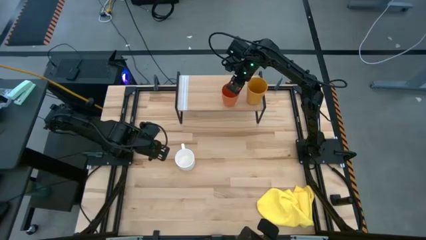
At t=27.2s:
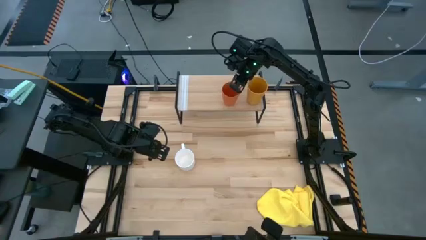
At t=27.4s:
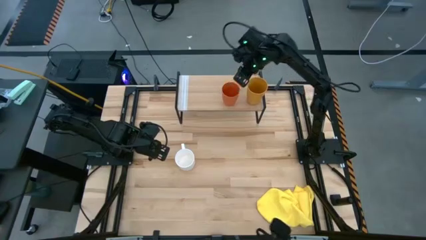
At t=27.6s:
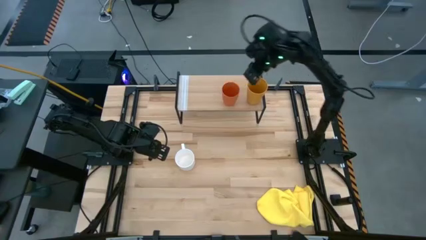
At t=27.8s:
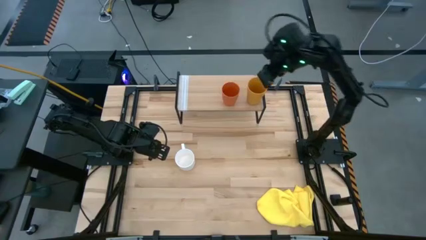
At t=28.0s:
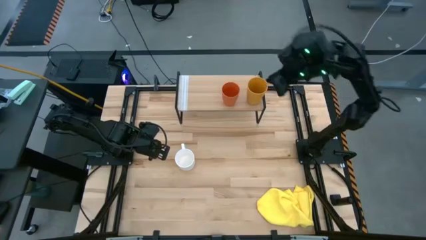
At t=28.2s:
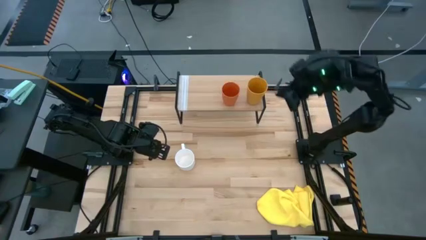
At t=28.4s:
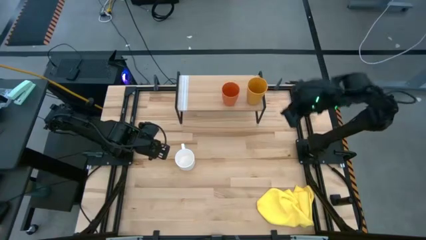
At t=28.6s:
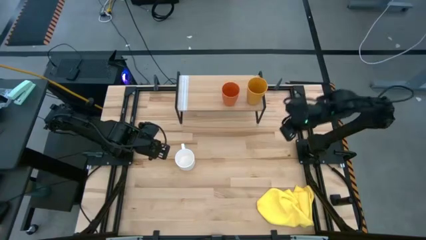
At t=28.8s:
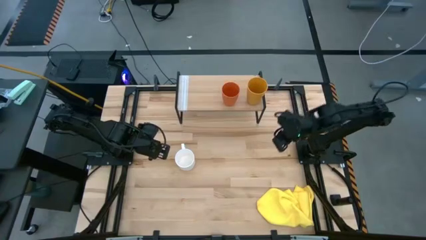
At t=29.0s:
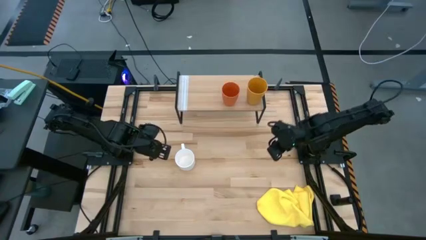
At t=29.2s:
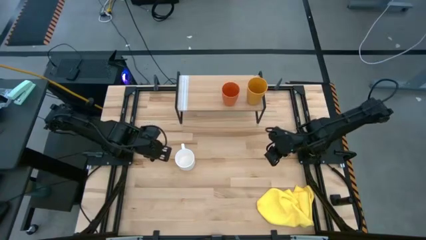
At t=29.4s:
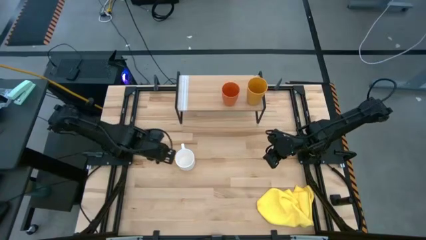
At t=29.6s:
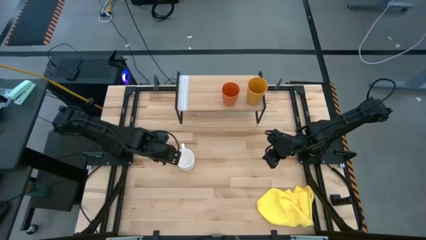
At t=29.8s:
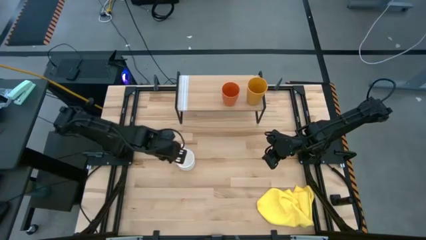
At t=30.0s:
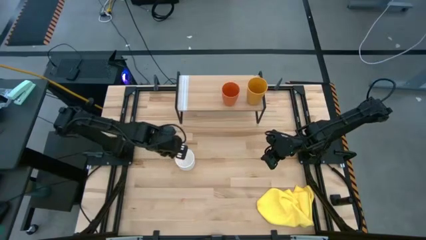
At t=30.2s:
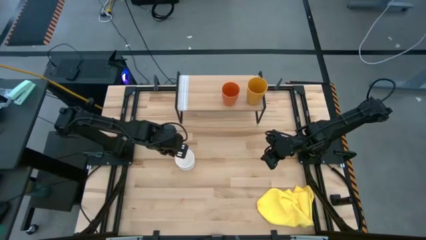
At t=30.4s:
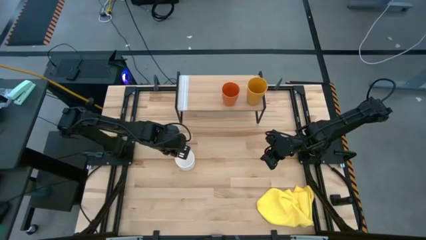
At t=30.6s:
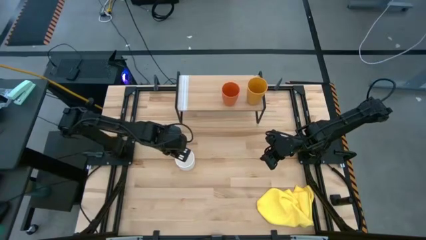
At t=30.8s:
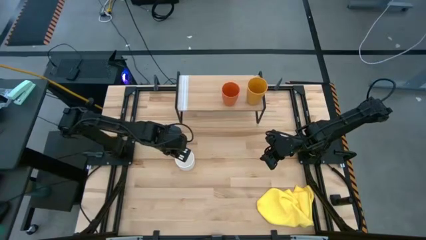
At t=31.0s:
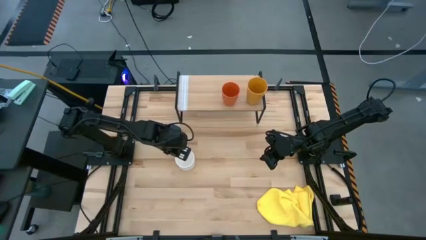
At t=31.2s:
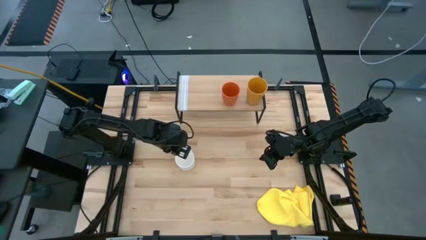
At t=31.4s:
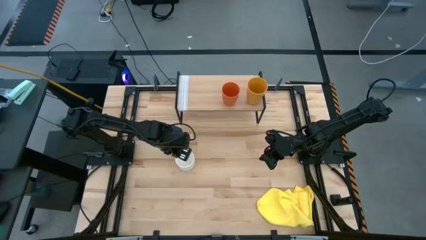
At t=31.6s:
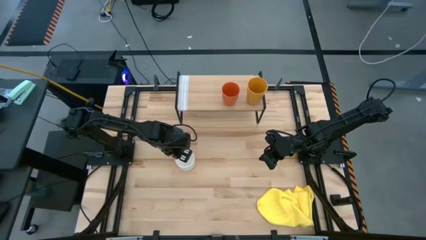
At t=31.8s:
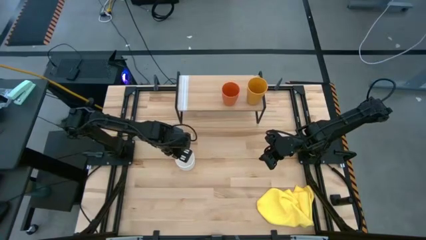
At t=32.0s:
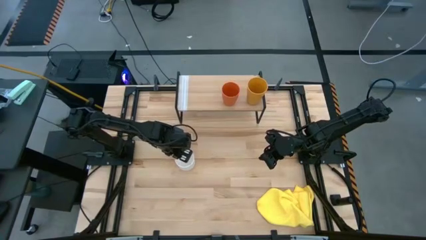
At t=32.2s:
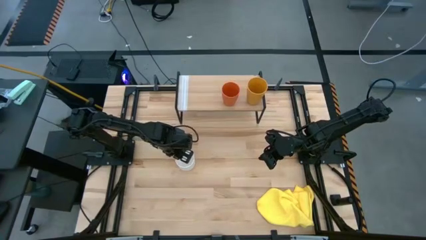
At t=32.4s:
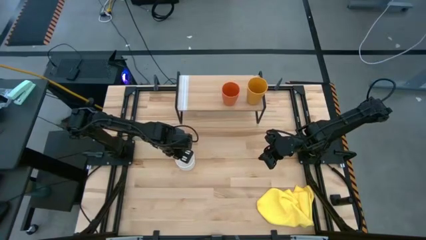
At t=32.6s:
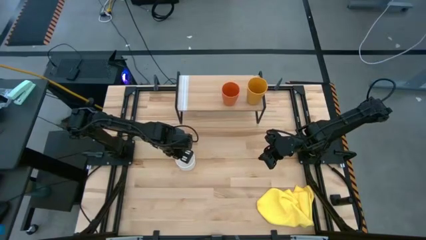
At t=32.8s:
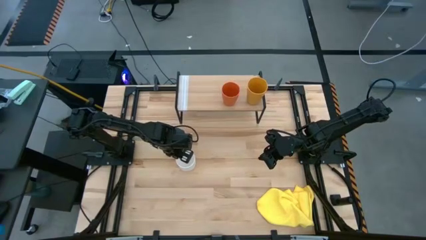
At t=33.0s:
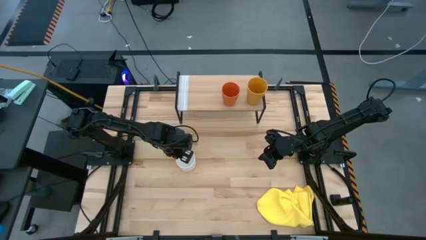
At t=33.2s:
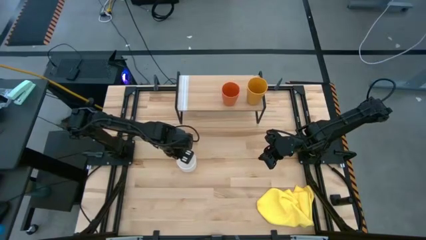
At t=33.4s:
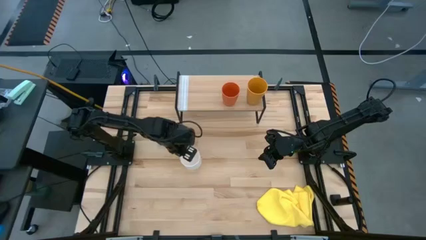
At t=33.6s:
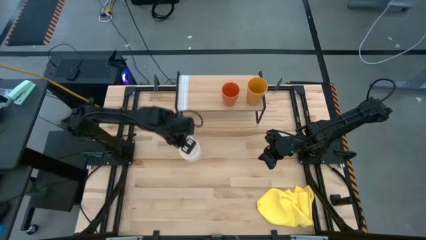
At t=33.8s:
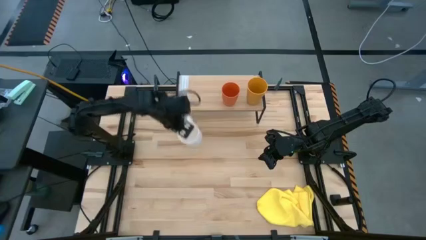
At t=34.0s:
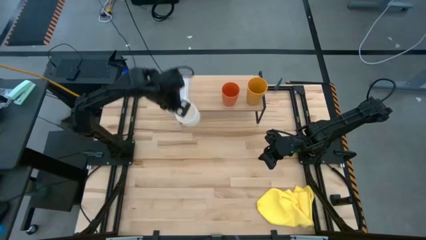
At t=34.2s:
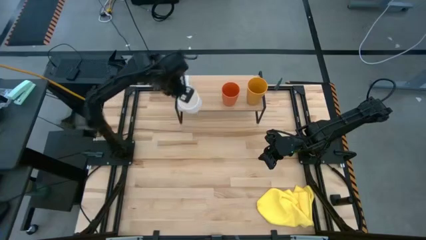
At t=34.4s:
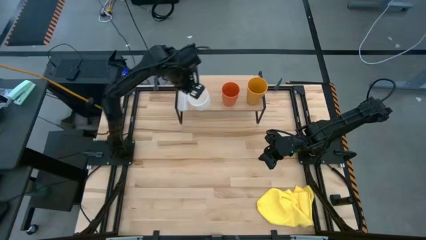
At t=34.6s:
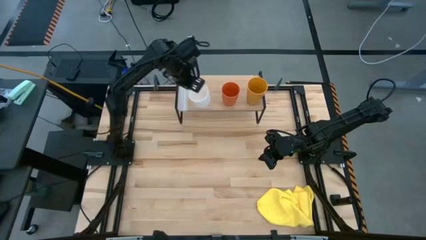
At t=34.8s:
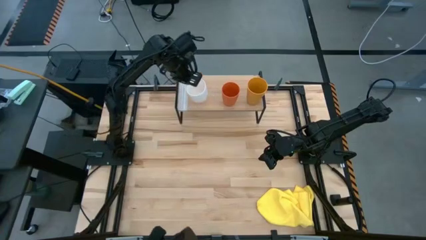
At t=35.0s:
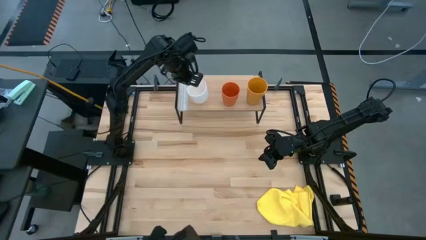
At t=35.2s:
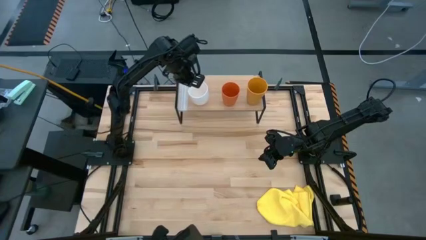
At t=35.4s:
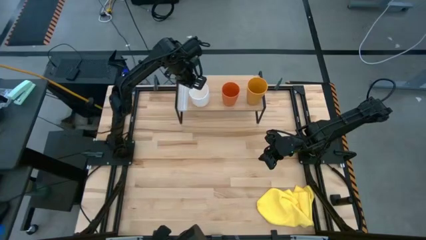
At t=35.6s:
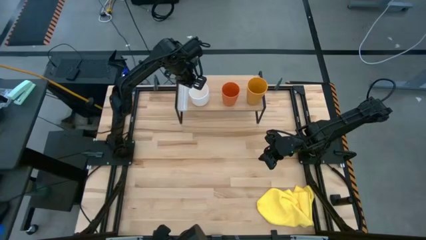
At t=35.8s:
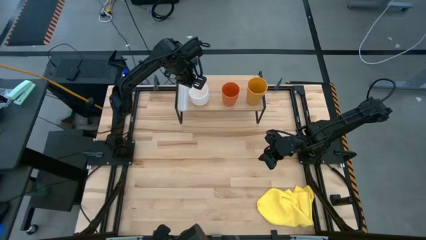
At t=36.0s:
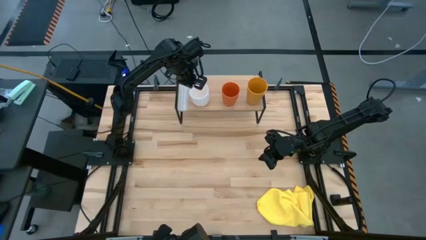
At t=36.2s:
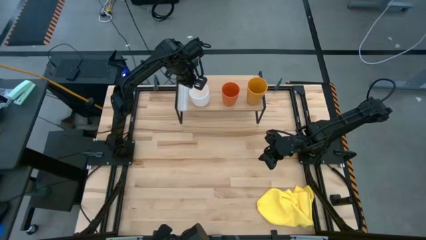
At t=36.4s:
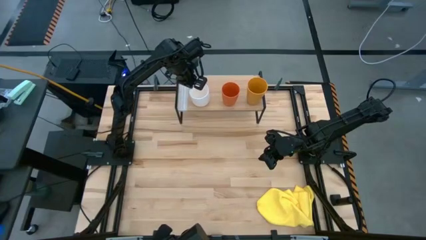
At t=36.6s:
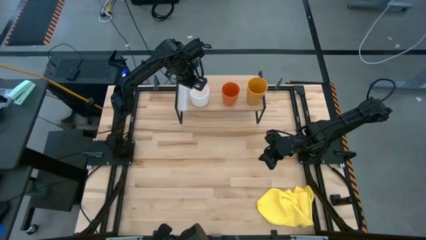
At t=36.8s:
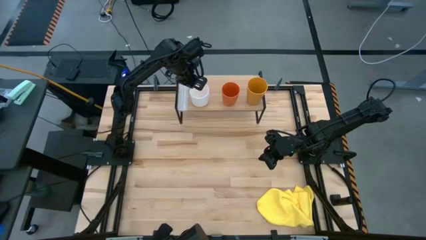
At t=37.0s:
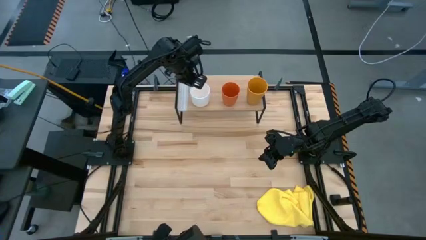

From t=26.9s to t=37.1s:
Task: Stack small to large cups/mugs on shelf
Put the white mug on the shelf
